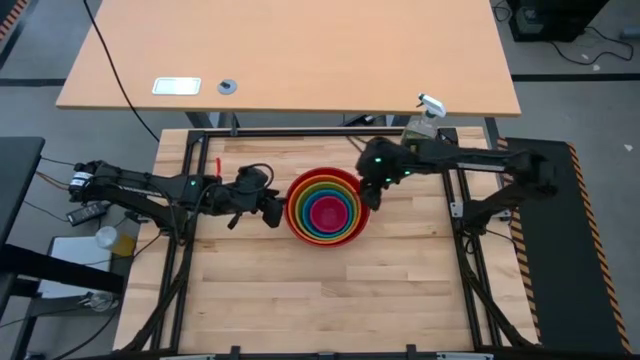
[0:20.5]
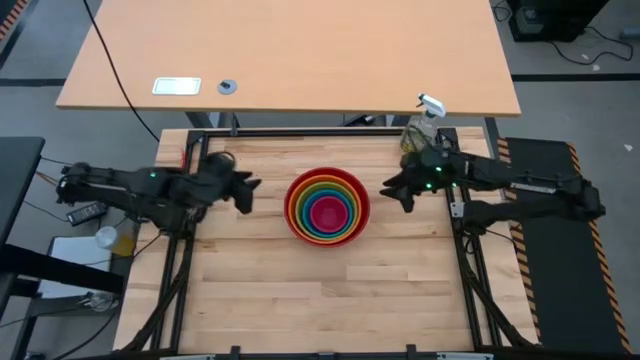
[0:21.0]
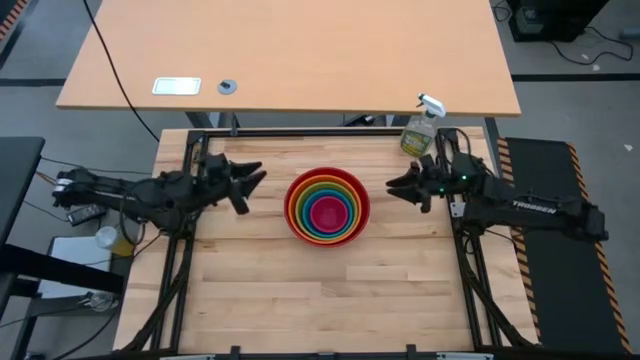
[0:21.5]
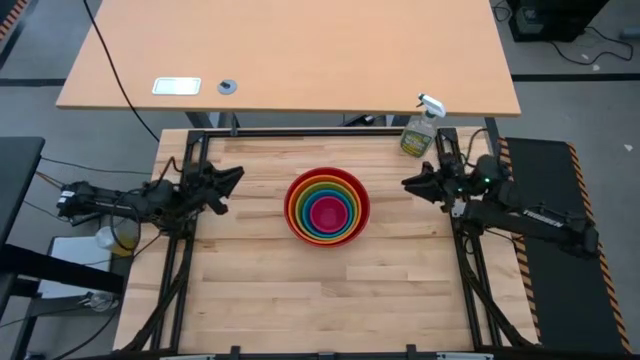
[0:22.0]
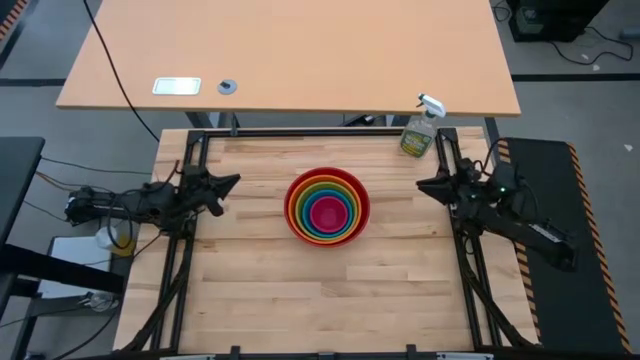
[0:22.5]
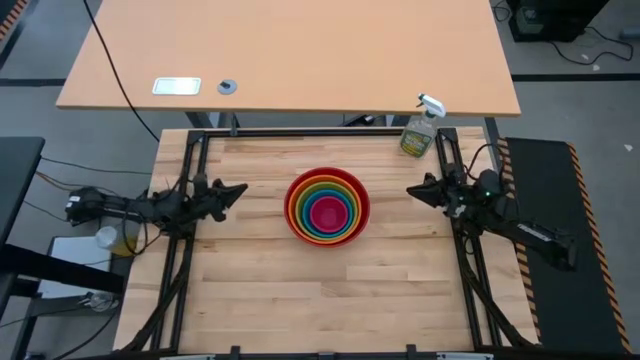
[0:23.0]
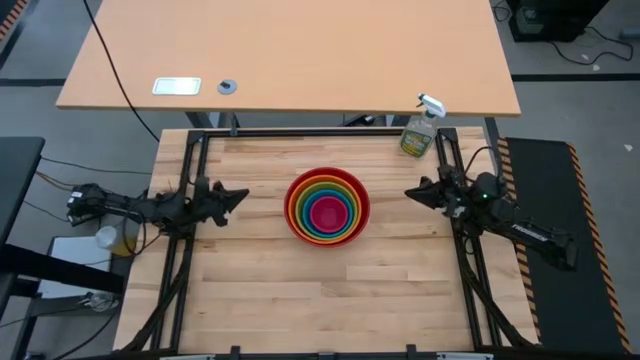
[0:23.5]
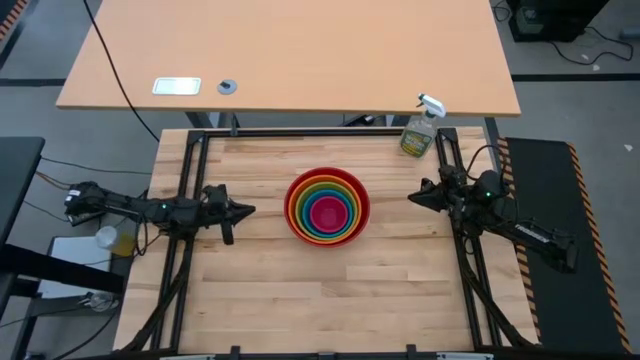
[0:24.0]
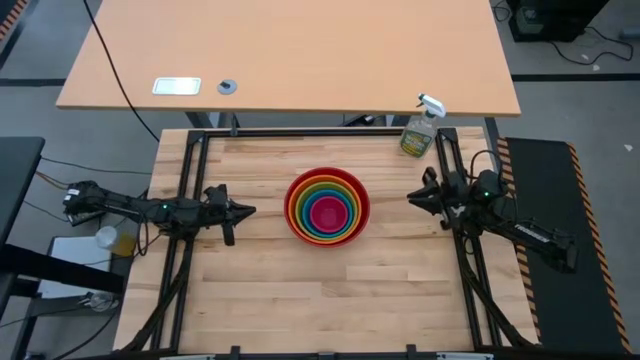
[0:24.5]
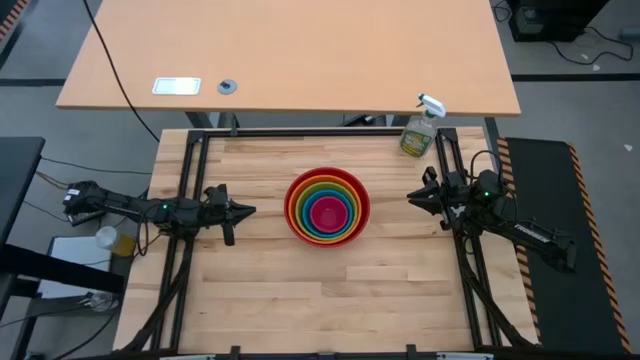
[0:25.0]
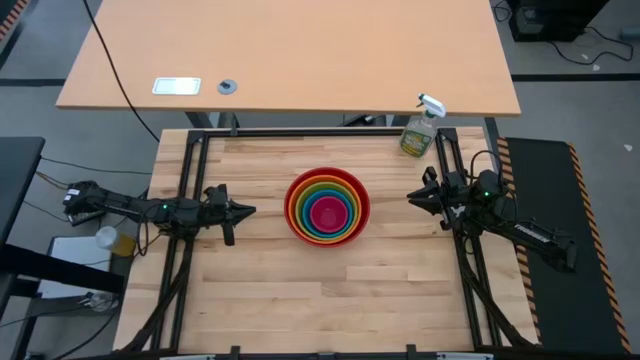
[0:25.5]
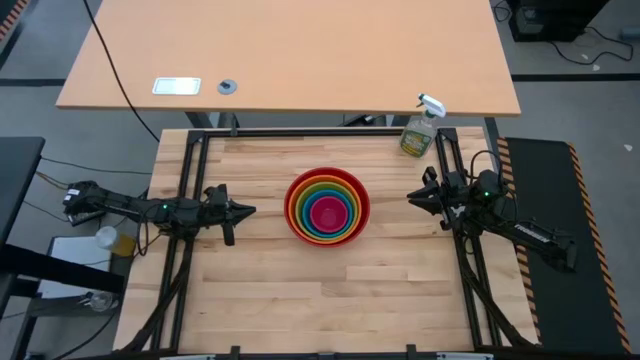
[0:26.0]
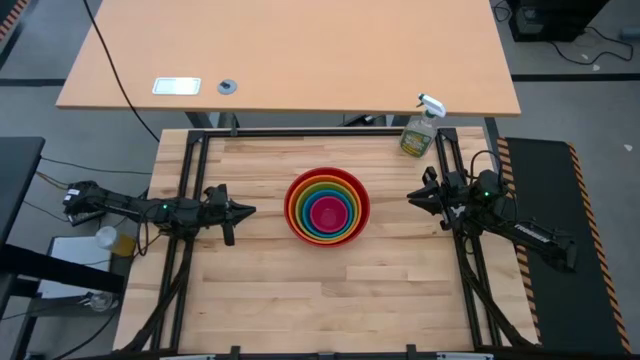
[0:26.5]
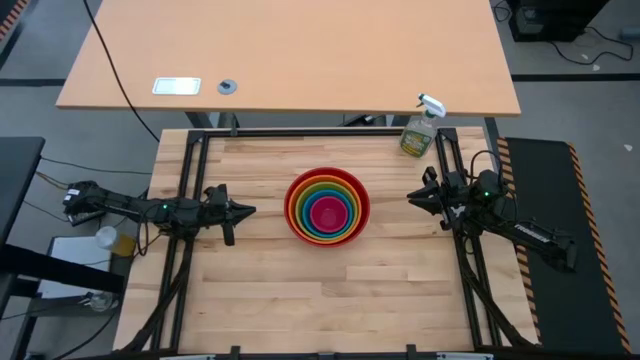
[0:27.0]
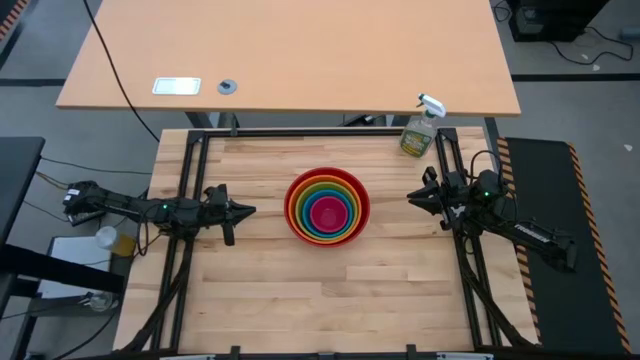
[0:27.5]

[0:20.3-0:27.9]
Return to Home Position

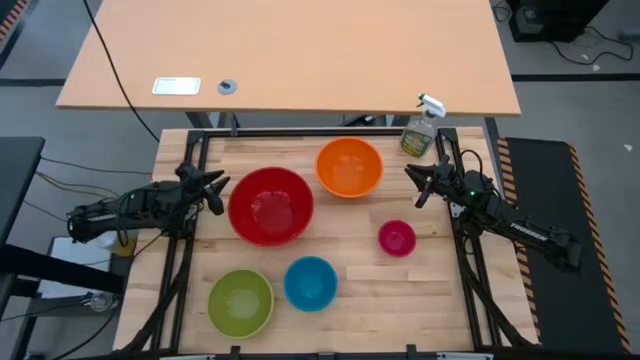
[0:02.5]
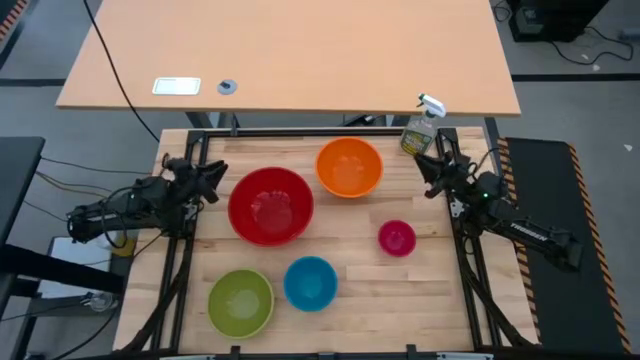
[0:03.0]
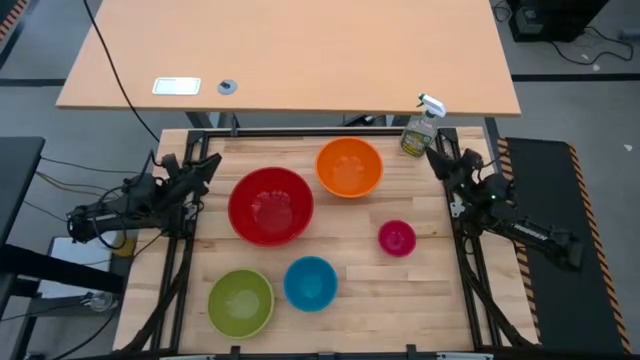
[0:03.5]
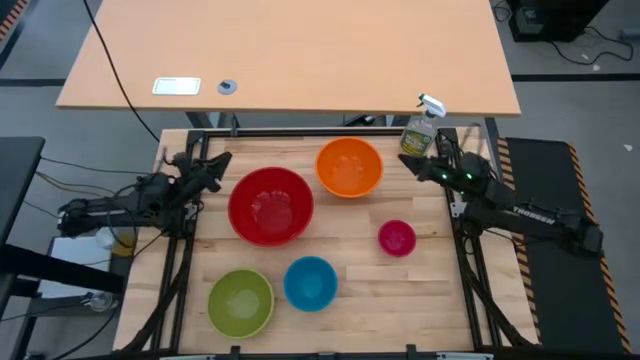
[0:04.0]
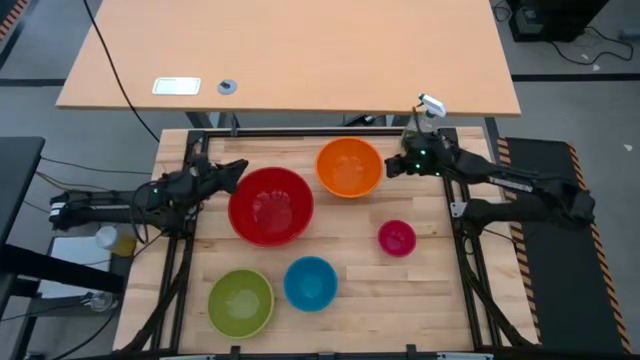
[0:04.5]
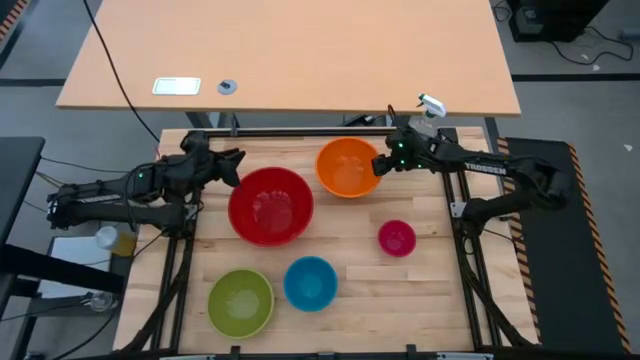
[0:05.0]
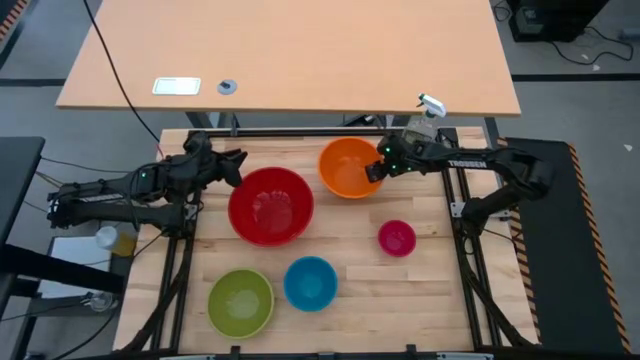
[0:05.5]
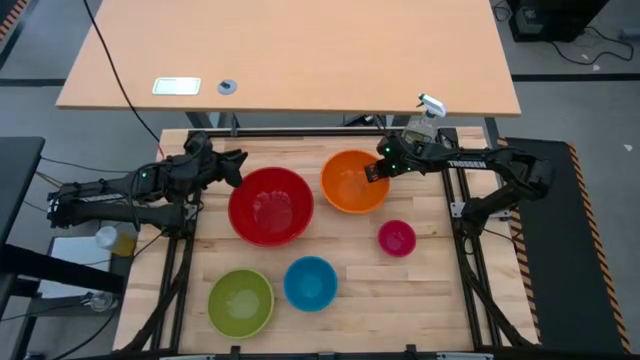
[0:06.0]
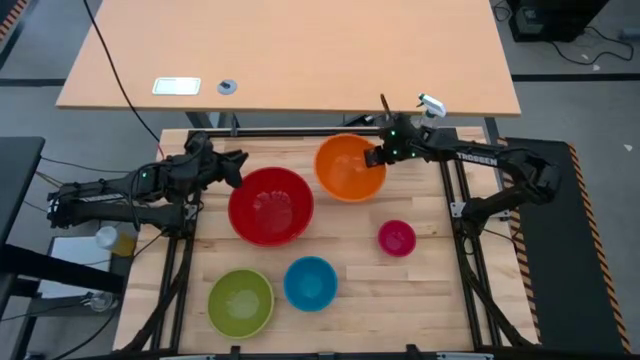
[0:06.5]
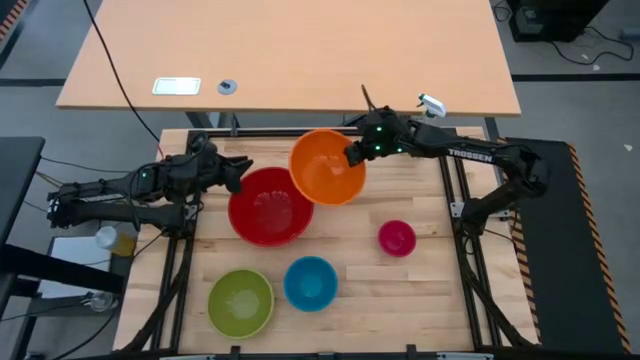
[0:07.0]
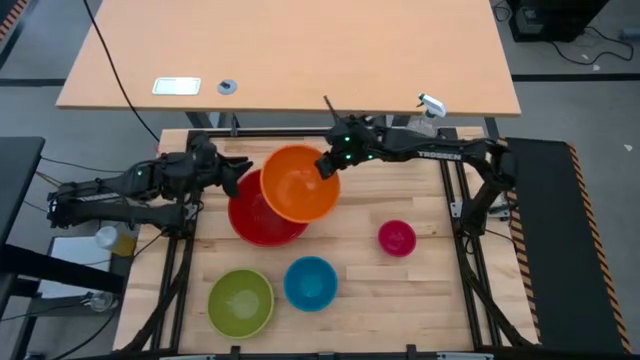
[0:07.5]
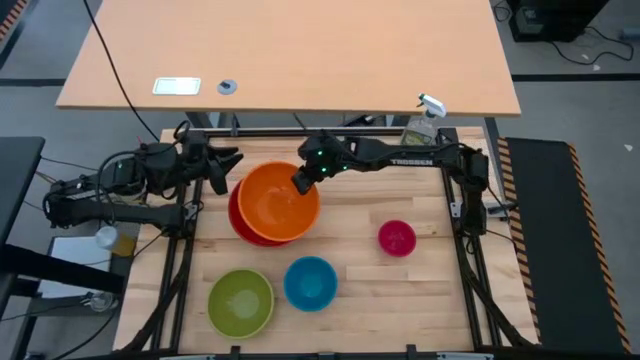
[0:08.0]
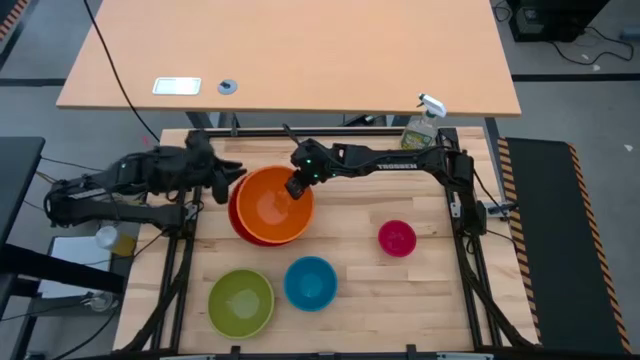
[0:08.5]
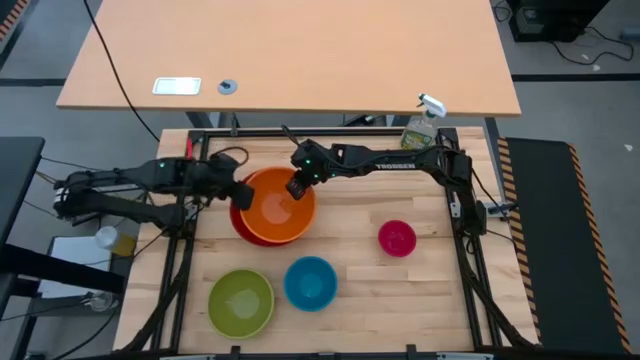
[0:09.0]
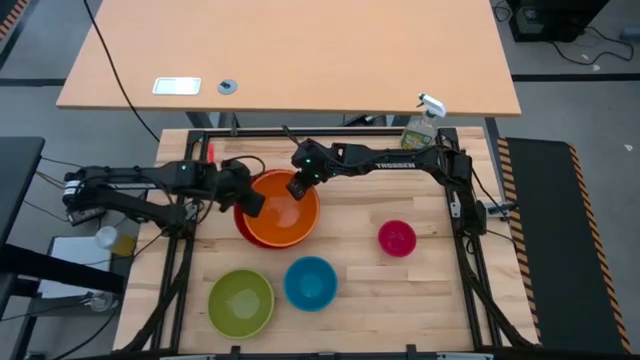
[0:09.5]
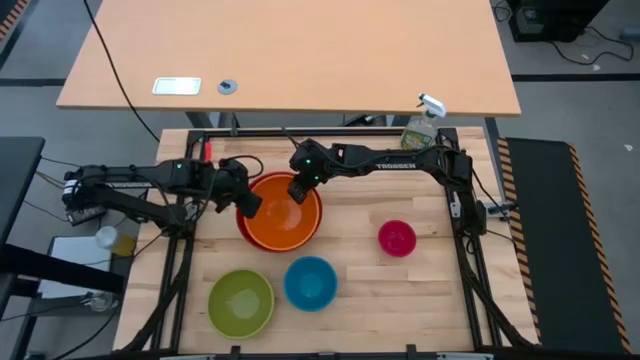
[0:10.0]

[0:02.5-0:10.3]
Stack the orange bowl on top of the red bowl

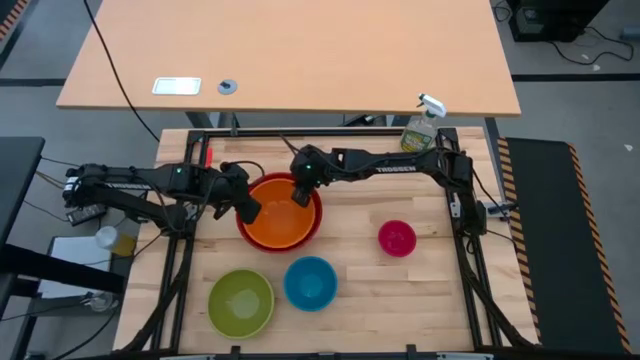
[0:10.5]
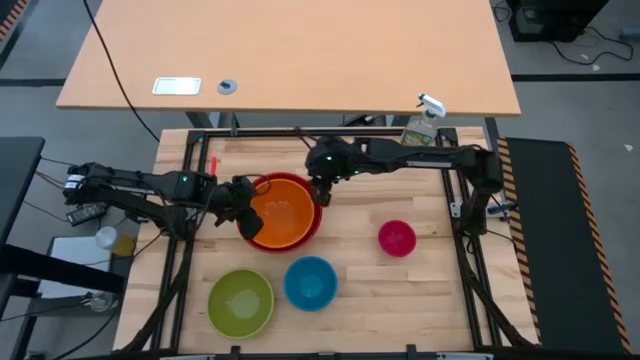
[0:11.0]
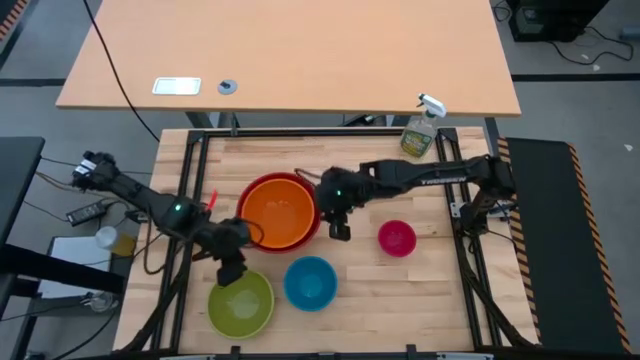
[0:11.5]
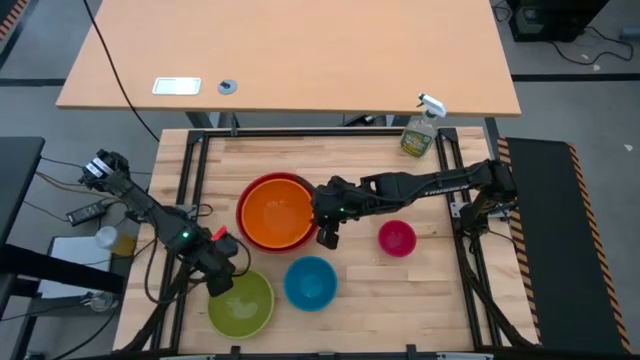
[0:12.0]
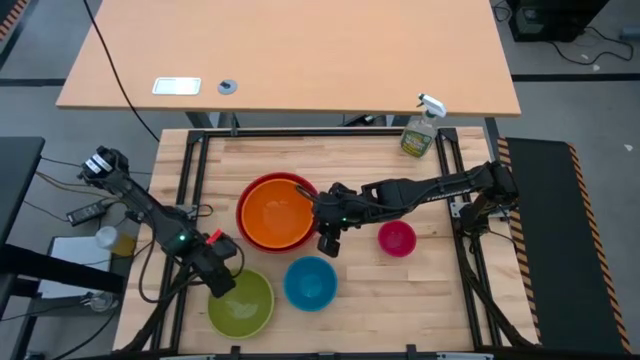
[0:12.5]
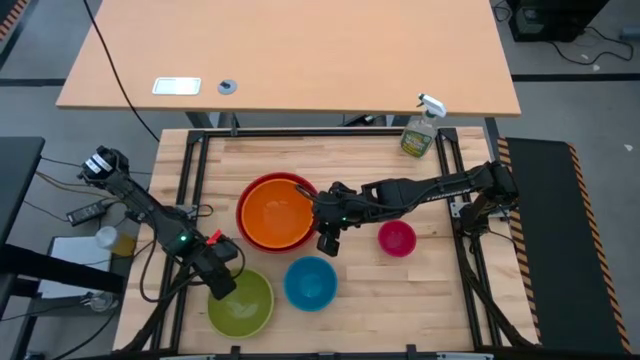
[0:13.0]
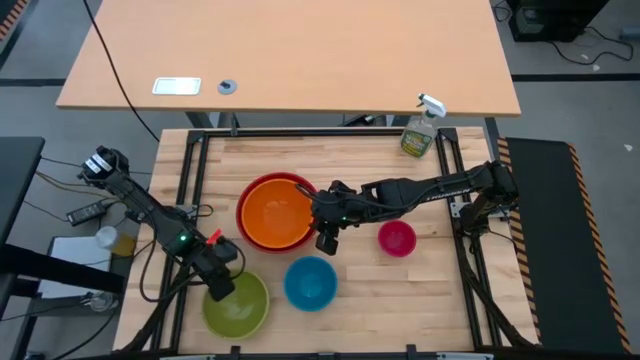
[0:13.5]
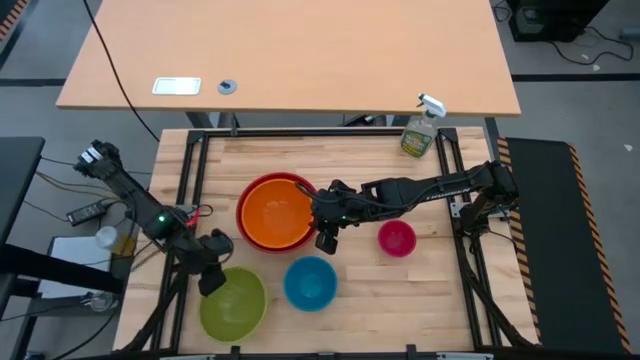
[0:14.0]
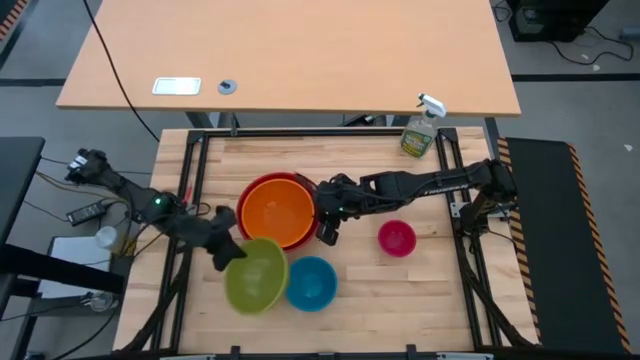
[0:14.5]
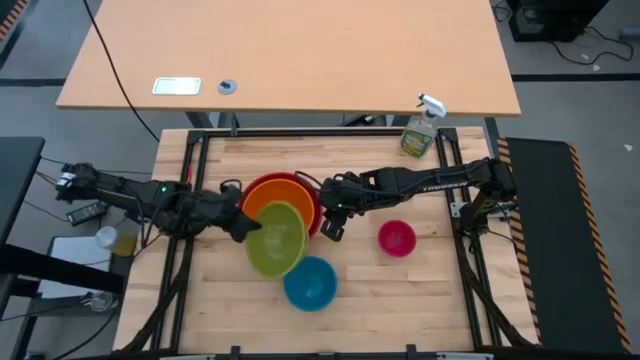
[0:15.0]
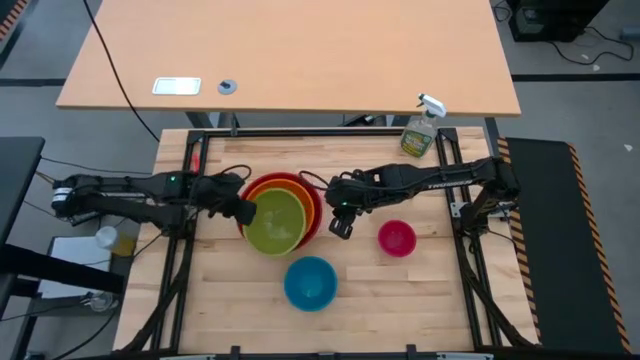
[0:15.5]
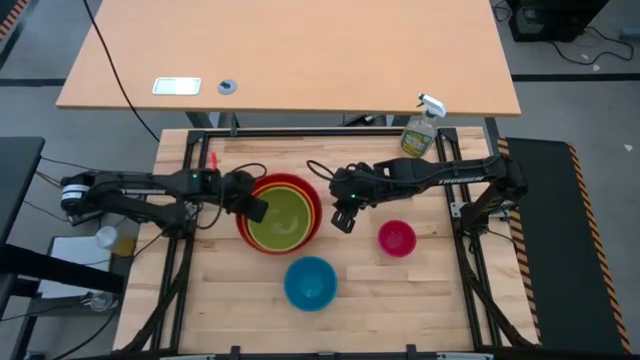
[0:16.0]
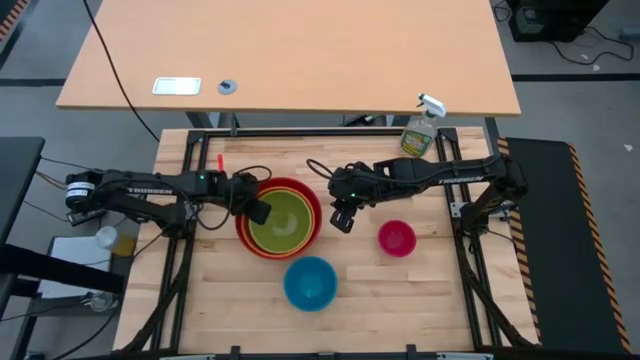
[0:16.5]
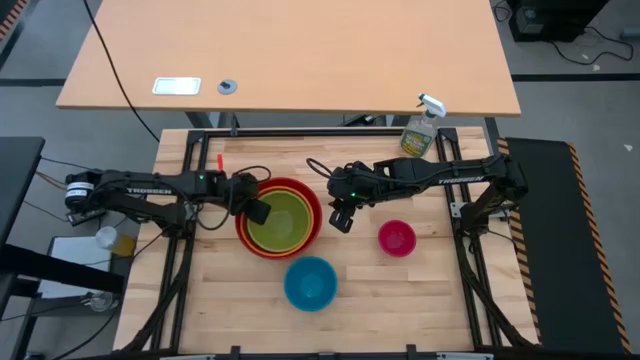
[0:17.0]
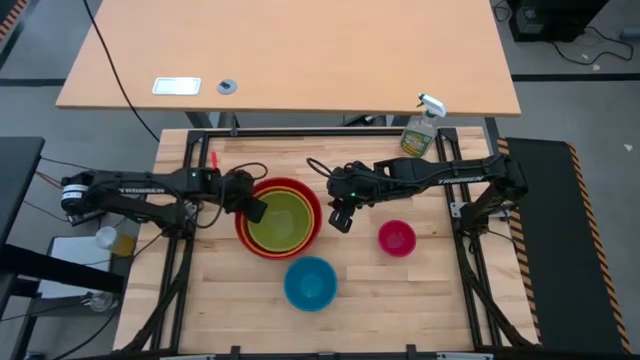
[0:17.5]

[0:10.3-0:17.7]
Stack the green bowl on top of the orange bowl
